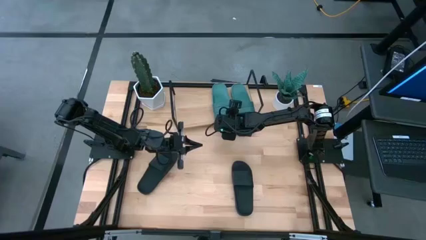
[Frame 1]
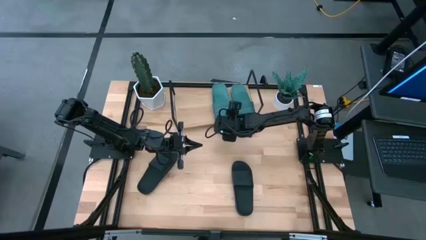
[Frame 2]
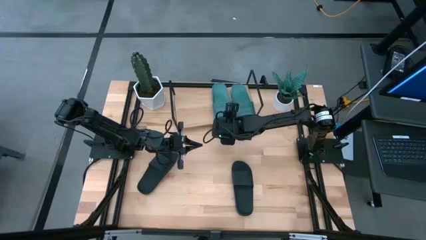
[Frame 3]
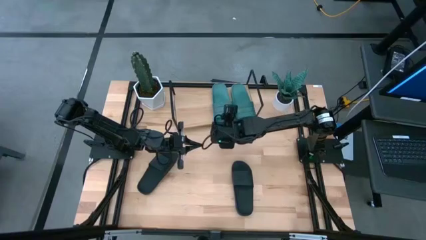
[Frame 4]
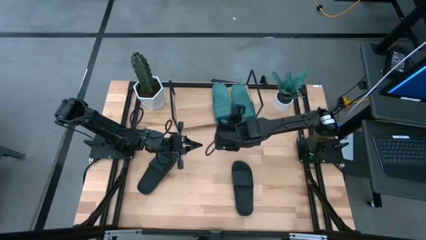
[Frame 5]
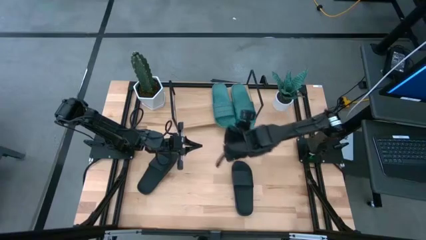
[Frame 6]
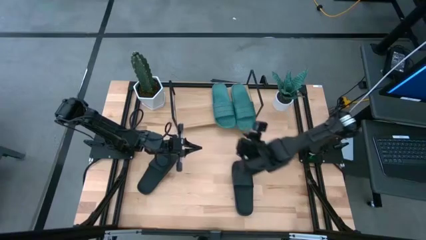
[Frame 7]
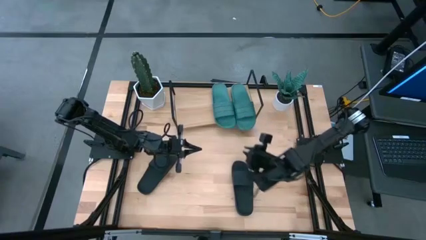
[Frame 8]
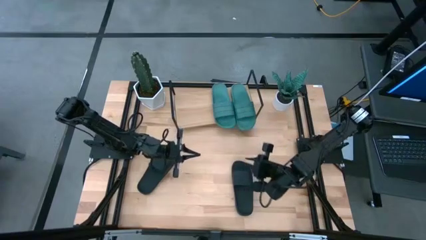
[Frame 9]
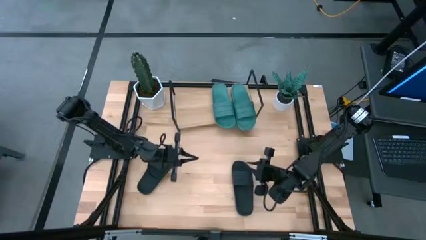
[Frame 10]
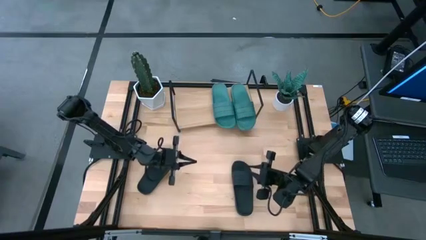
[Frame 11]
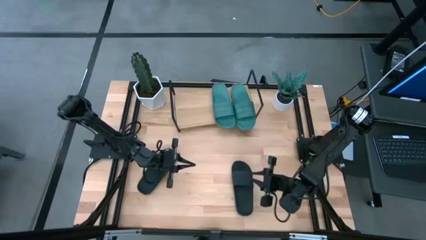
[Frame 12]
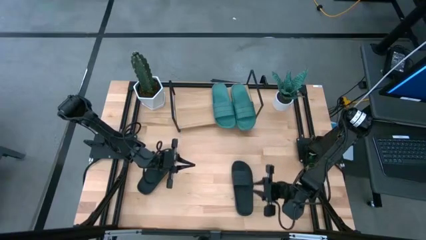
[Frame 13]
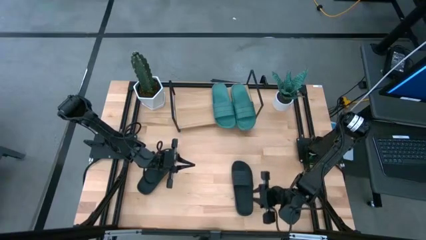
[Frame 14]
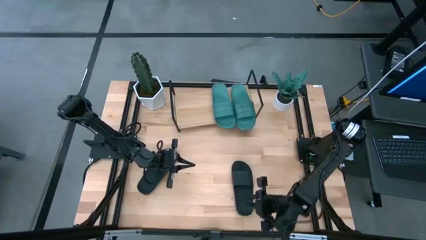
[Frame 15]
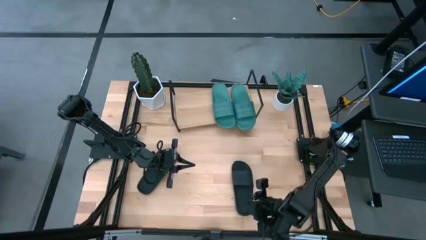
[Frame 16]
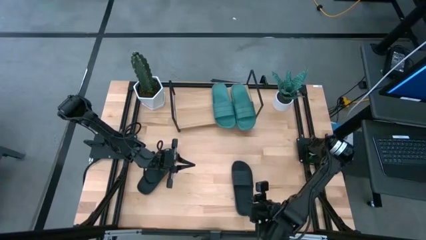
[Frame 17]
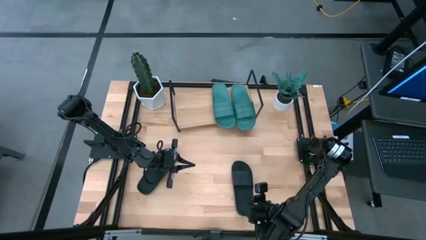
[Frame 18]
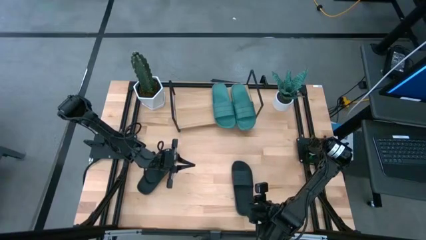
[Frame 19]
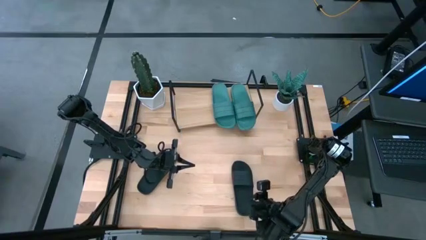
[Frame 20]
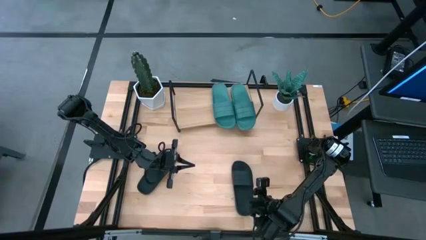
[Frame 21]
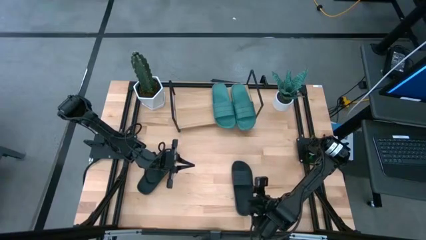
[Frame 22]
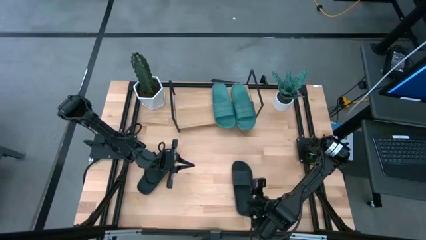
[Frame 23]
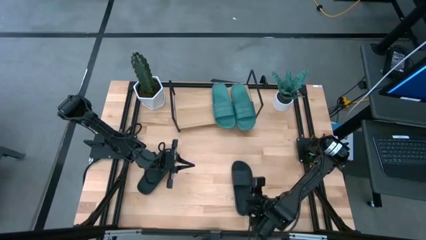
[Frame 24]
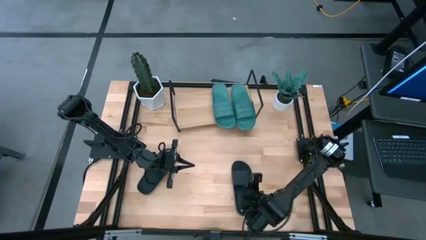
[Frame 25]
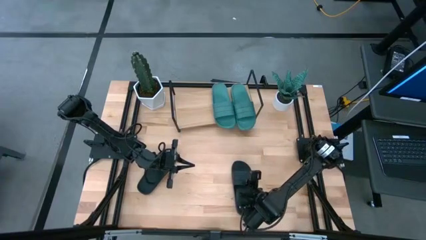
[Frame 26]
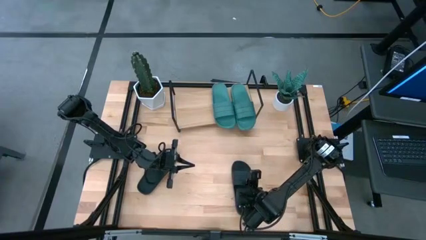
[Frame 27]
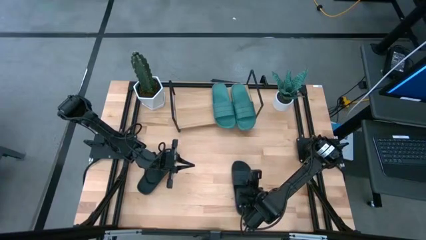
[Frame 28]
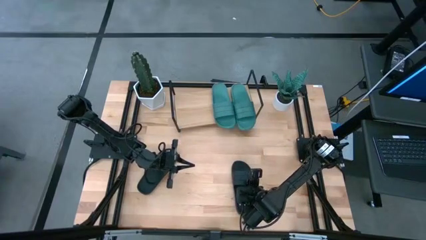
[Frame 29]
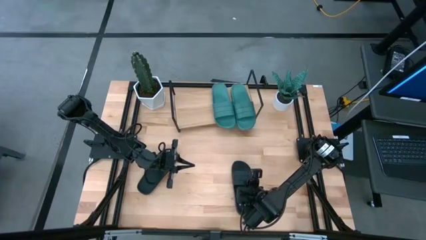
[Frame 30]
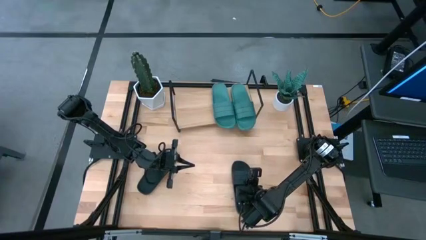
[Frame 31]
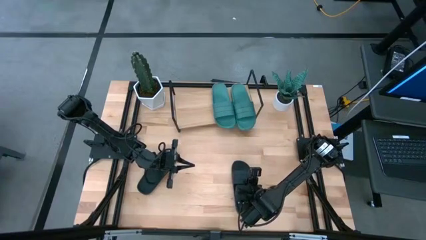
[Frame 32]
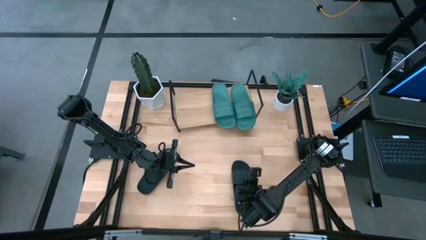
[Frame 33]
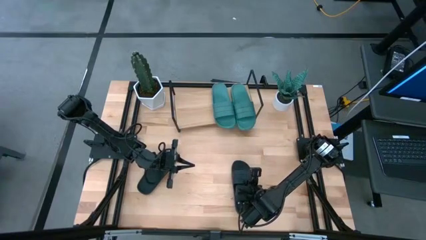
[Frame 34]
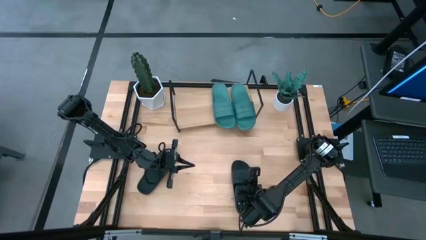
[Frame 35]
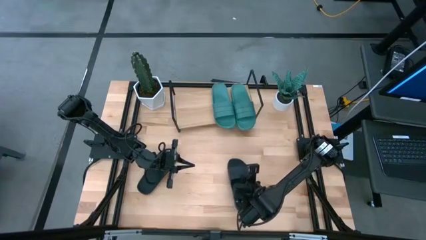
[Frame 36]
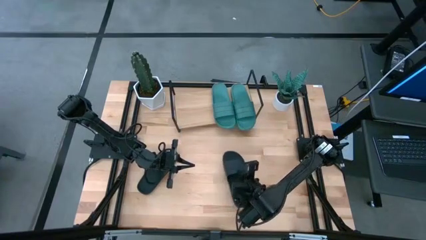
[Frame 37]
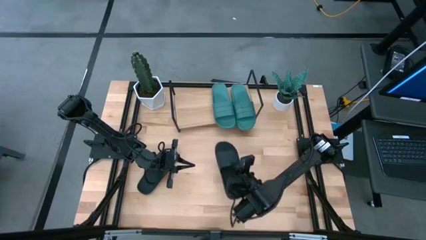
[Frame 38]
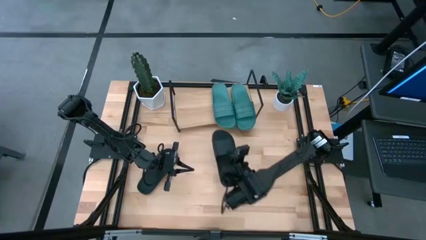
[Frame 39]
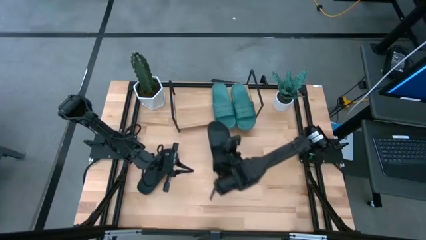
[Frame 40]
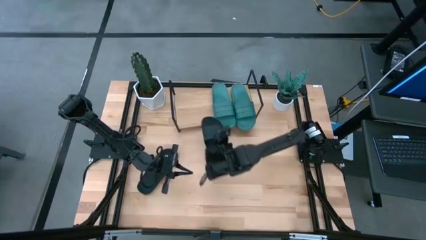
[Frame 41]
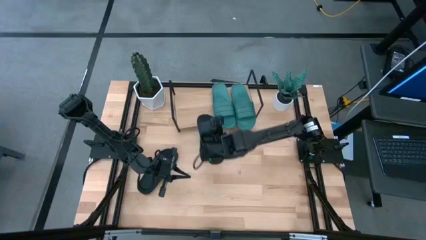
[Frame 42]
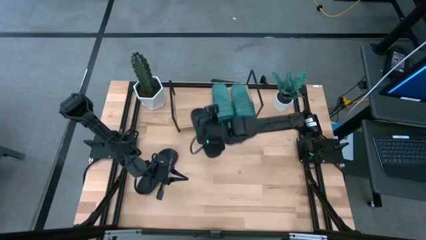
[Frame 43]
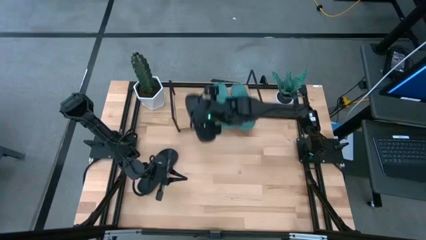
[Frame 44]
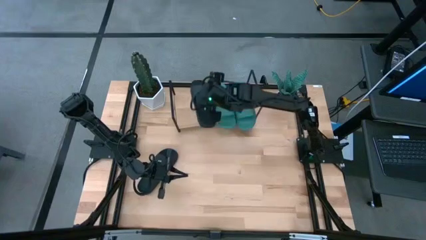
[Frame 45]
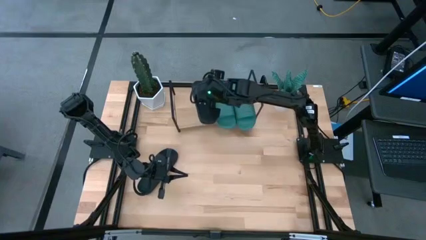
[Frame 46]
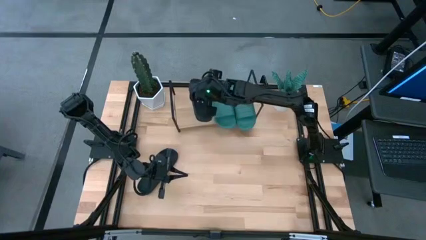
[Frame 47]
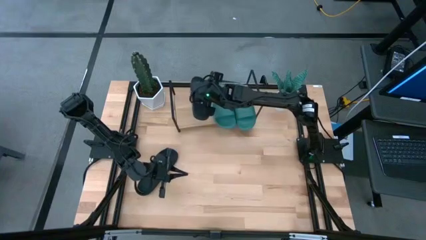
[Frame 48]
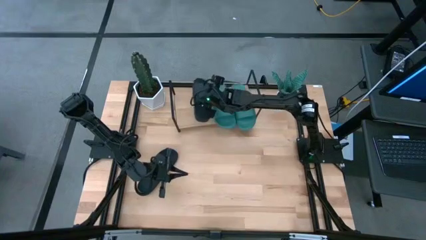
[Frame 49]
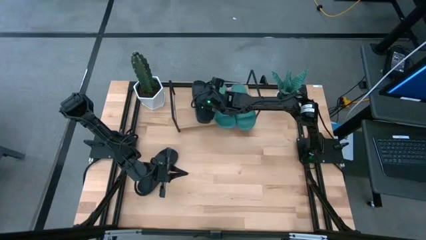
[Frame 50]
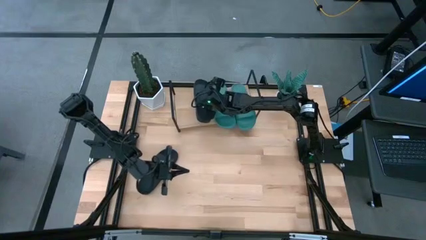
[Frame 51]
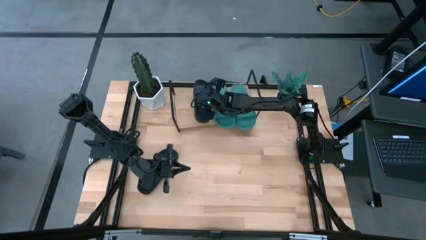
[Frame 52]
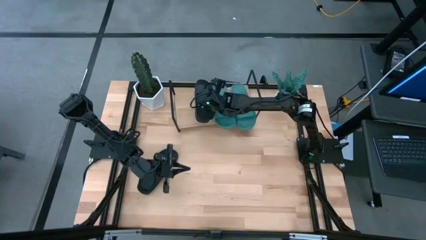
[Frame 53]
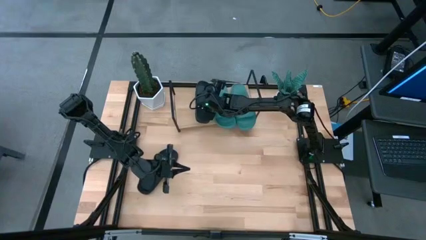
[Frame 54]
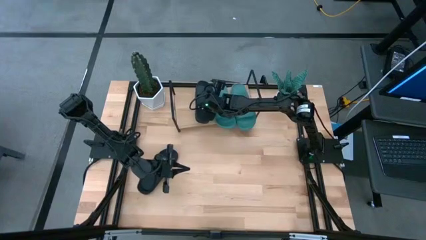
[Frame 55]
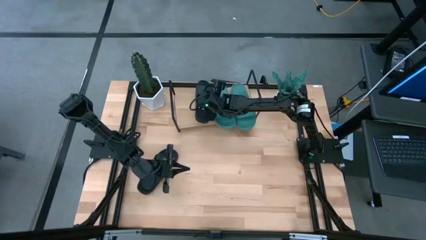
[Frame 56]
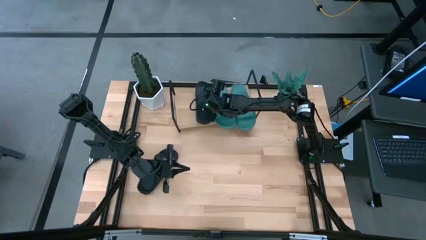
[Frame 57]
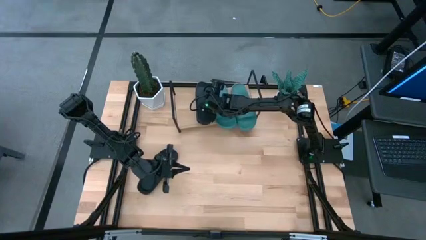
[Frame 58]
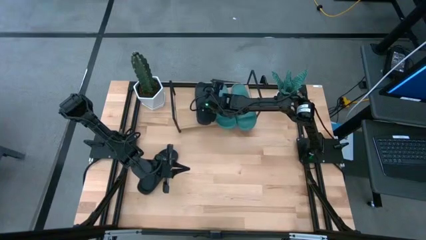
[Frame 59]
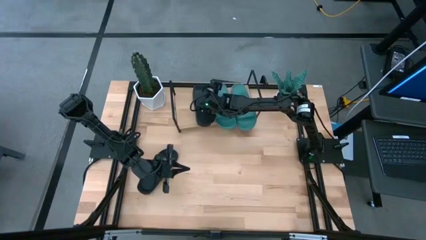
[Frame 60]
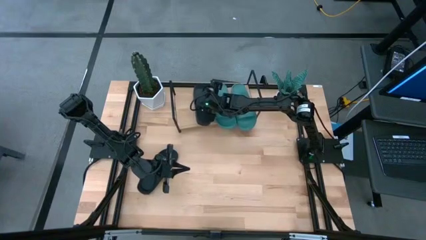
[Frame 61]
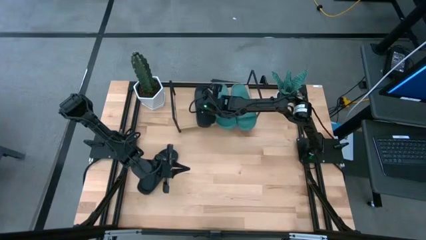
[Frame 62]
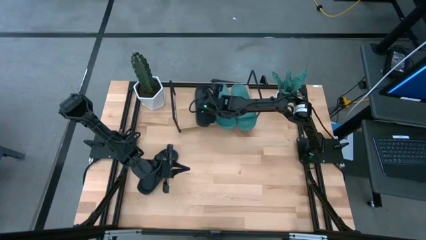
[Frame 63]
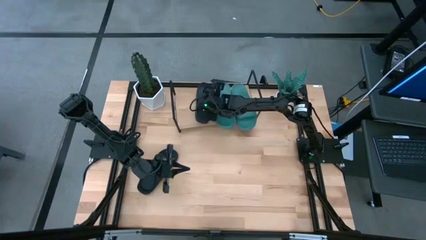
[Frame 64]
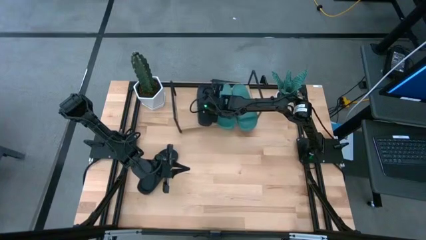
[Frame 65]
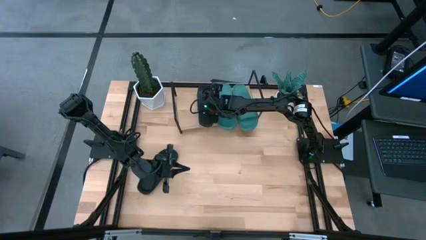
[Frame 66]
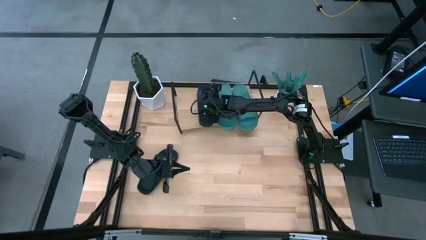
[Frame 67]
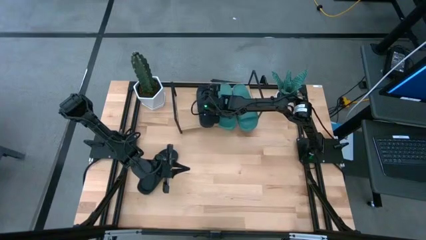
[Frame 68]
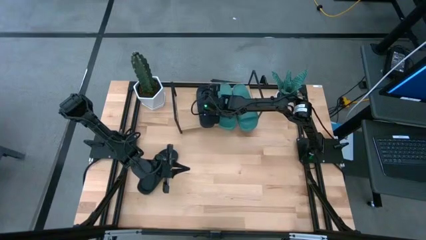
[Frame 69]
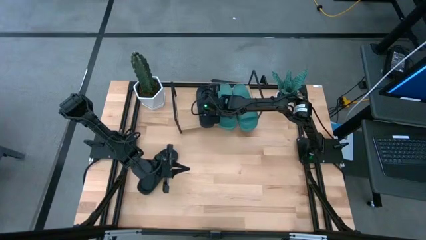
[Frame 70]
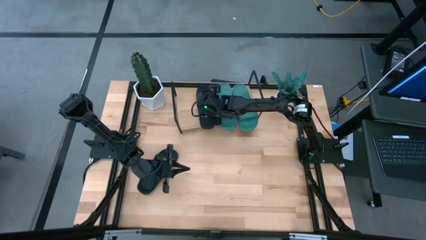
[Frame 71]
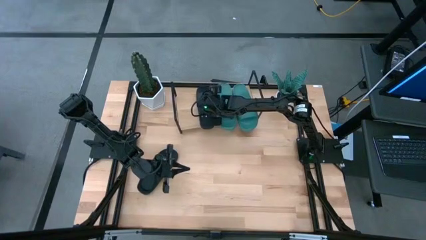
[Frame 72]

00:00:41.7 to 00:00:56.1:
Task: Pick and place slides into the shelf
Put the right black slide on the shelf

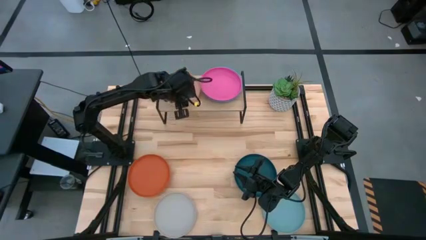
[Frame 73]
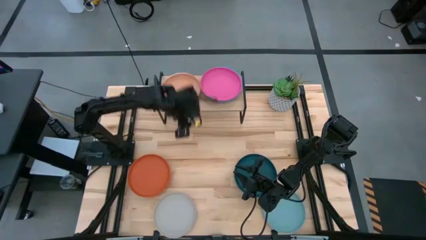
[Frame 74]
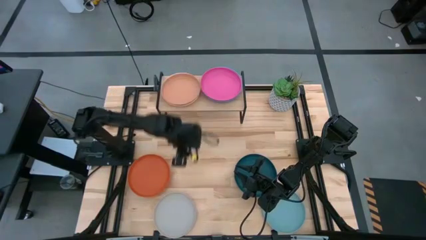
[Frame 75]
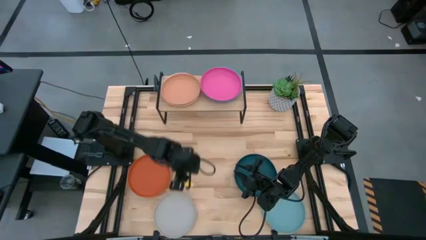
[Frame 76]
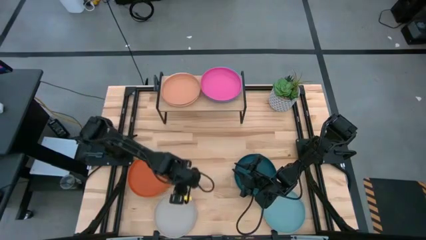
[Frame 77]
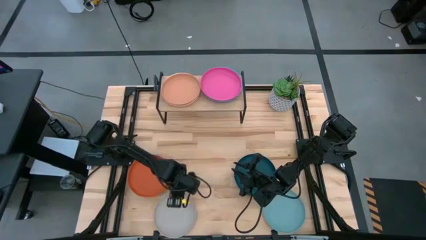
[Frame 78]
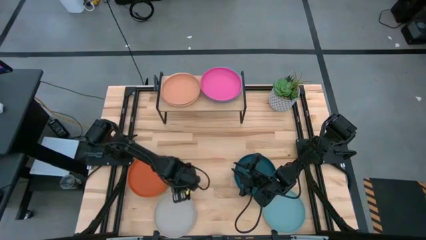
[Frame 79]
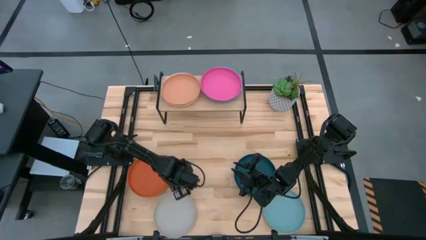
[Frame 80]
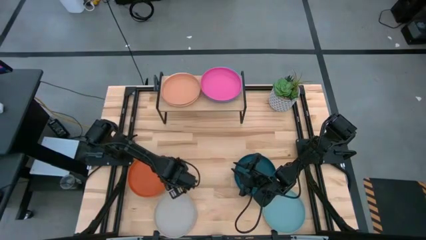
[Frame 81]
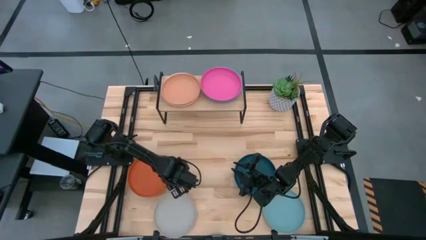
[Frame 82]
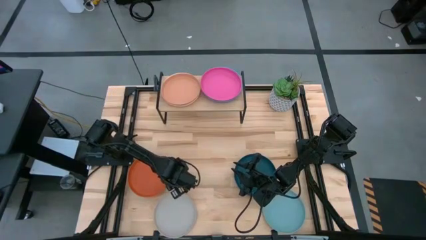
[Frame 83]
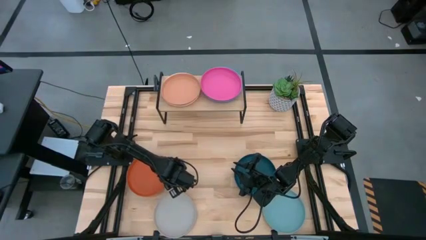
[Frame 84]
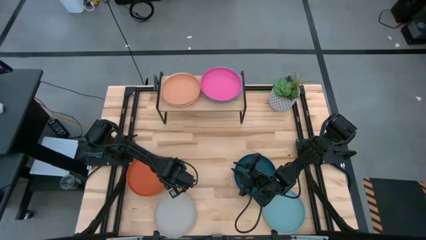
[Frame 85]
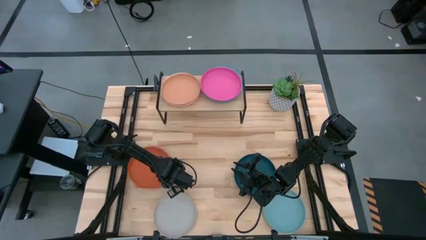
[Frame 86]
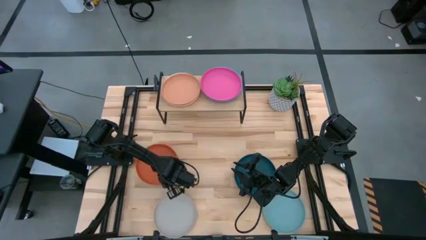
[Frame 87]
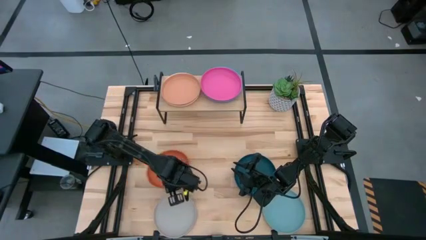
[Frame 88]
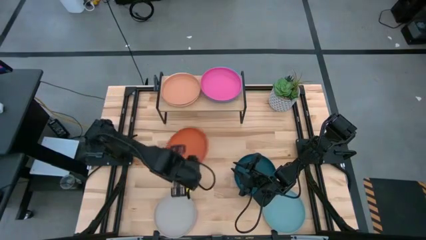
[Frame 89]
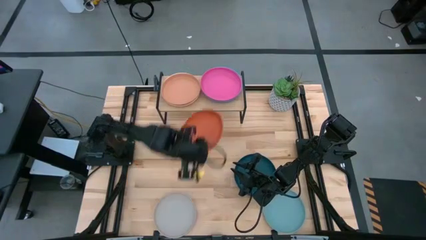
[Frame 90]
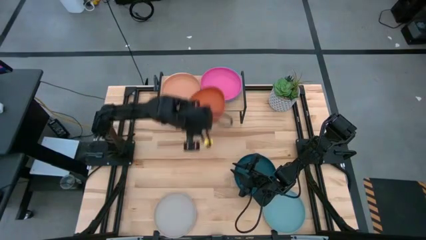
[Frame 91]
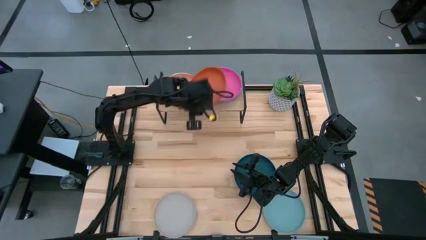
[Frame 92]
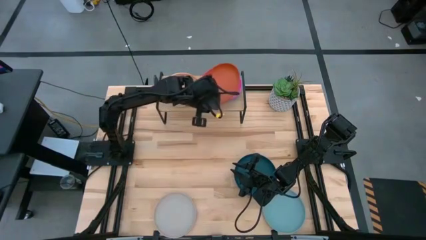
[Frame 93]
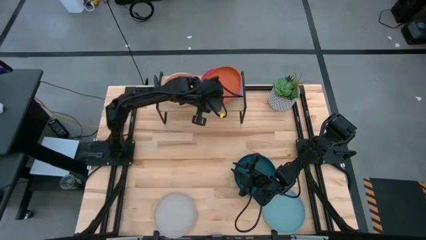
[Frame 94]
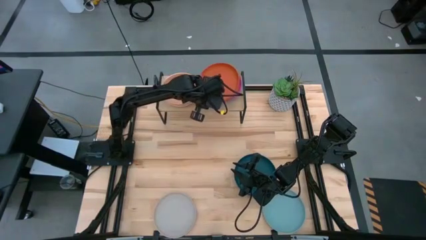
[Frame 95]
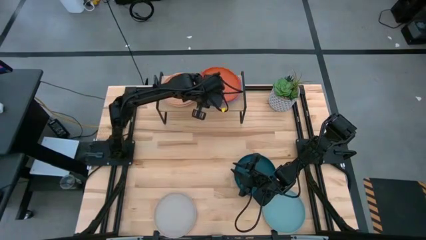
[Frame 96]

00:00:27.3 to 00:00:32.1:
Task: Place and stack plates onto a shelf
Stack the orange plate on top of the pink plate on the shelf
